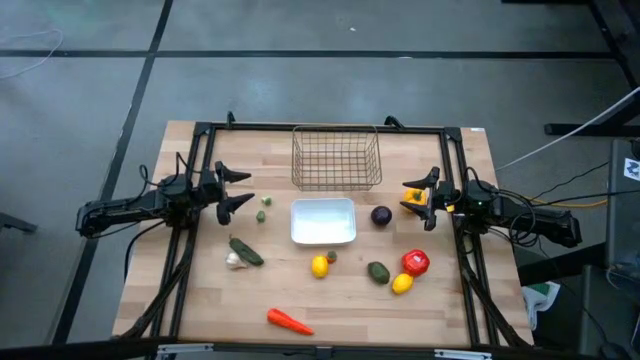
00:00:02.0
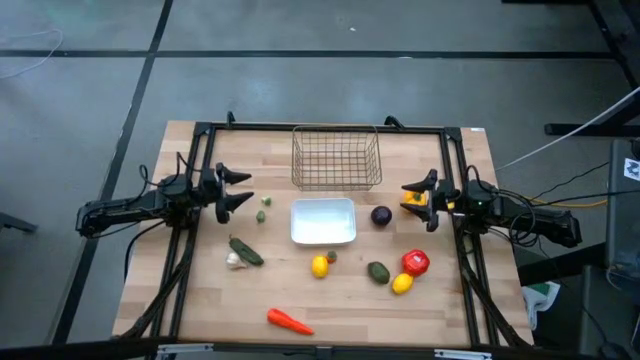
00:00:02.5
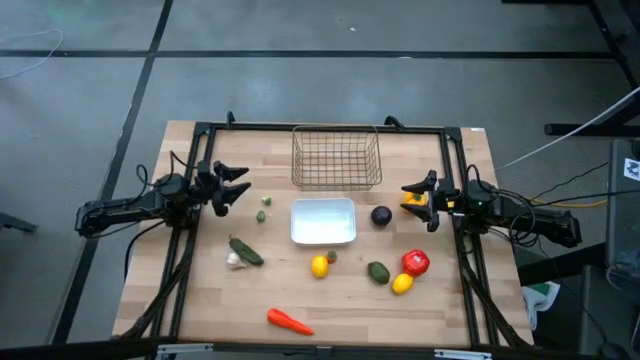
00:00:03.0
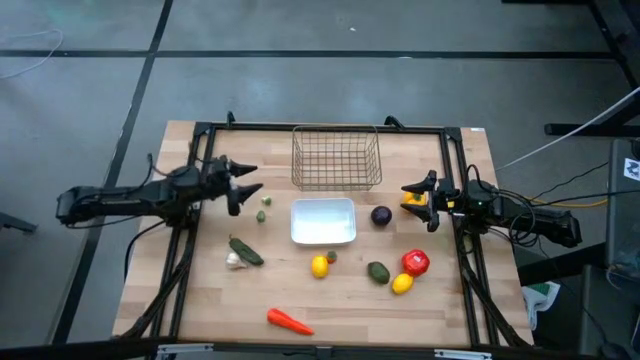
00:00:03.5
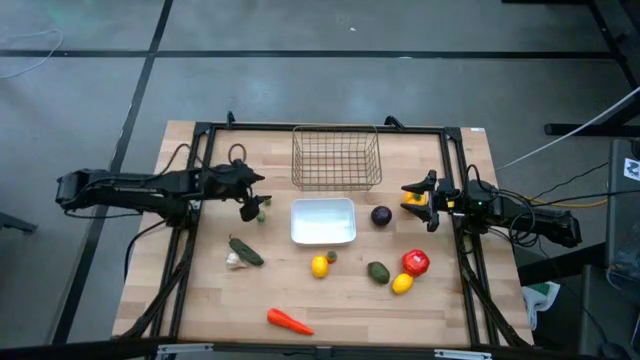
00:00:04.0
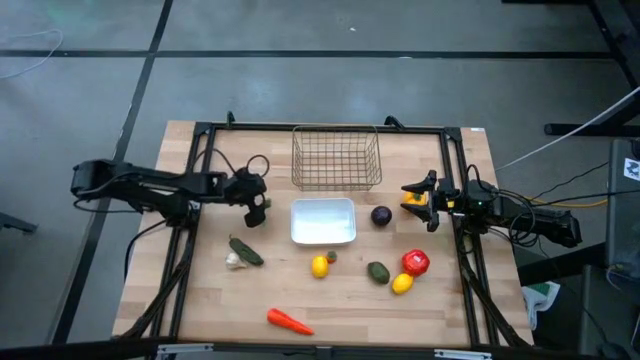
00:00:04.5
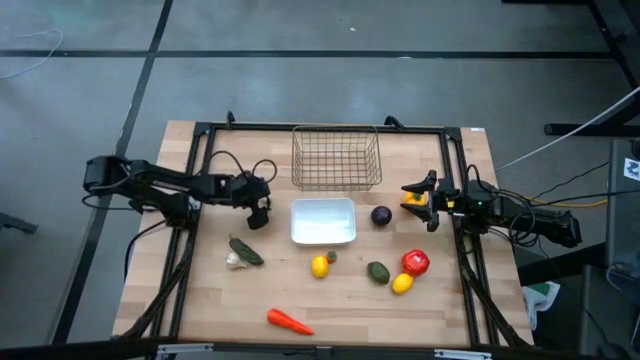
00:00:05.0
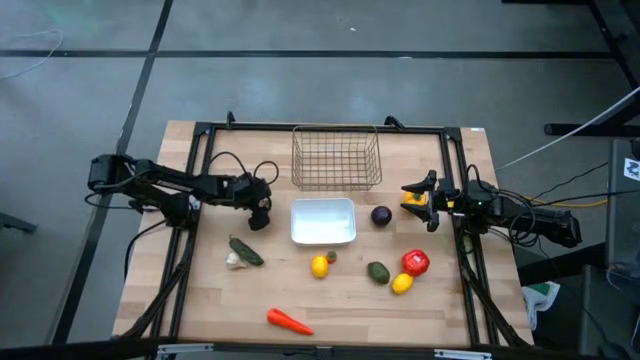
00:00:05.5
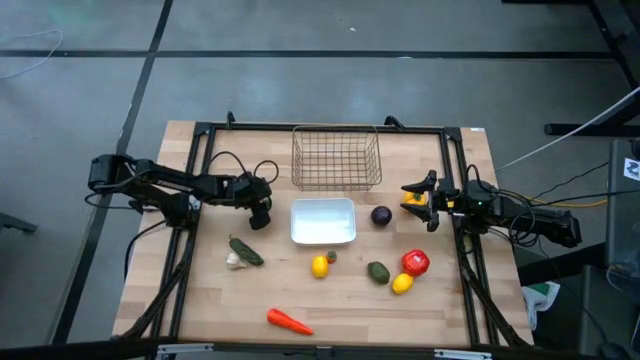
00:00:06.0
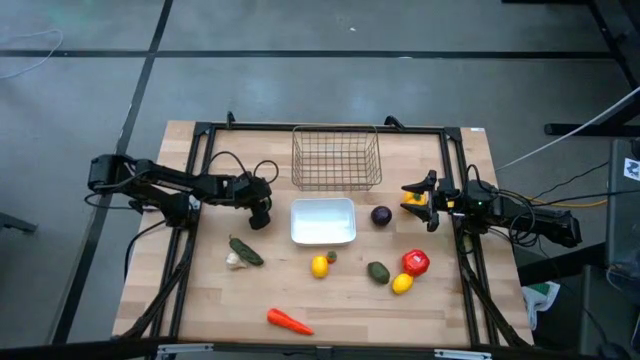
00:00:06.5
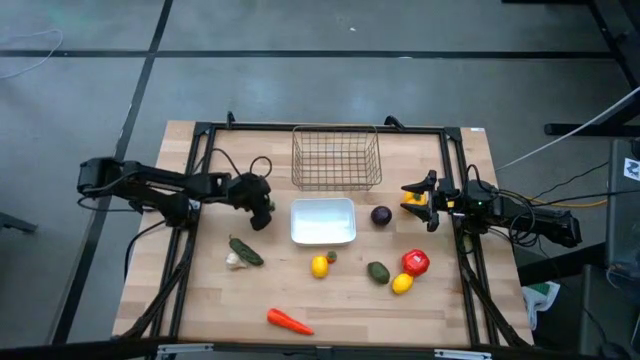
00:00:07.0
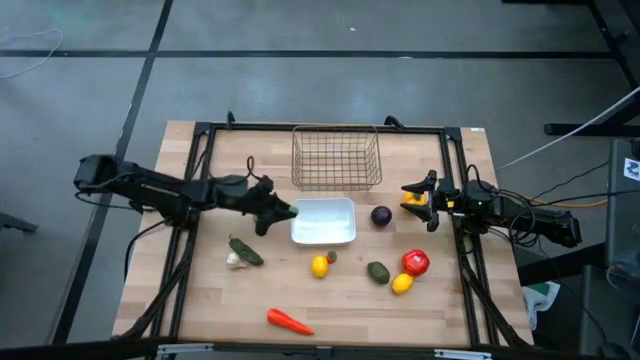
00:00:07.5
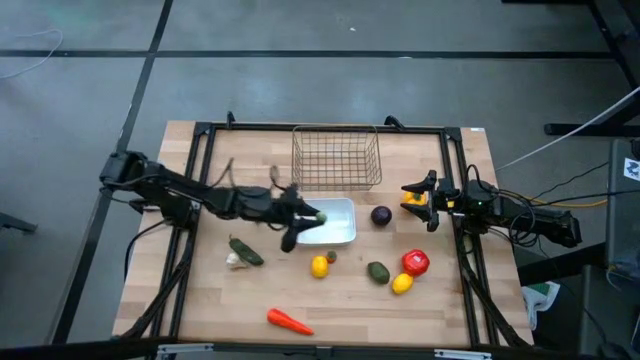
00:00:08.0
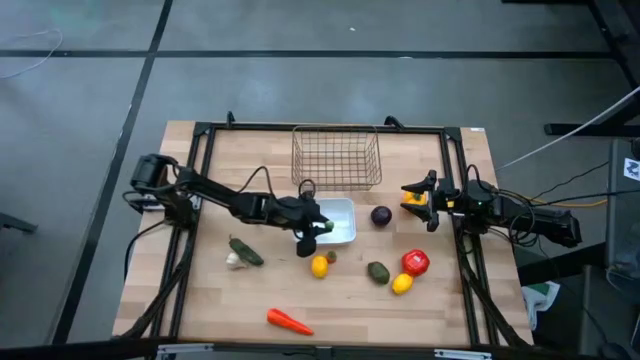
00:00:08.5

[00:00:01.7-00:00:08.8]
Task: Sort produce into baskets
Put the green mushroom into the white bin

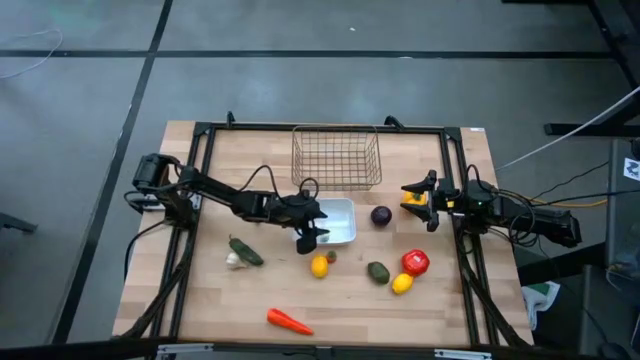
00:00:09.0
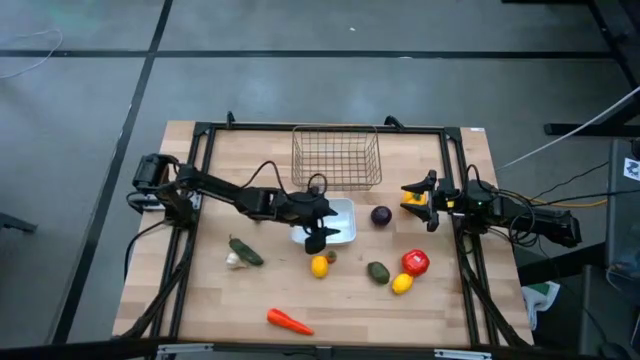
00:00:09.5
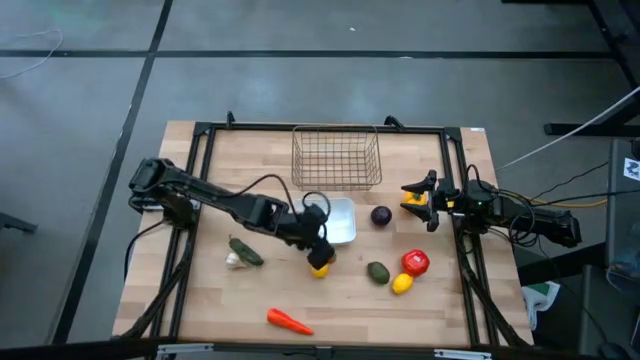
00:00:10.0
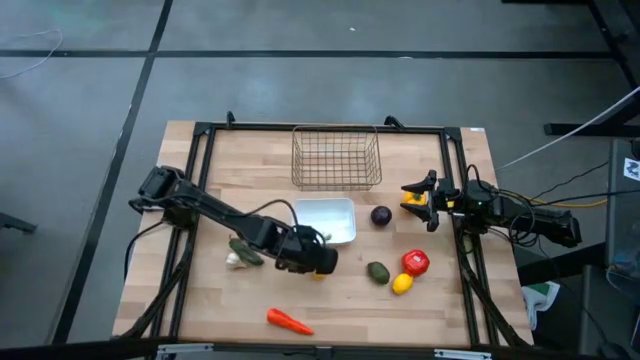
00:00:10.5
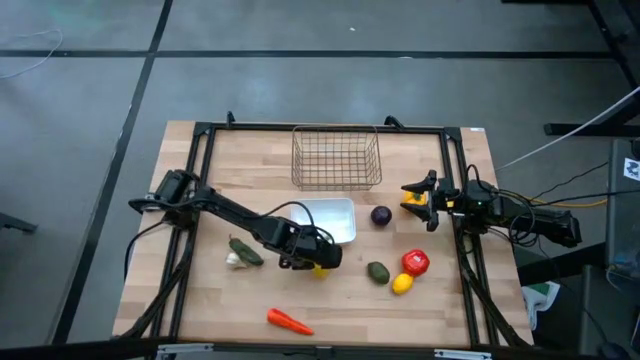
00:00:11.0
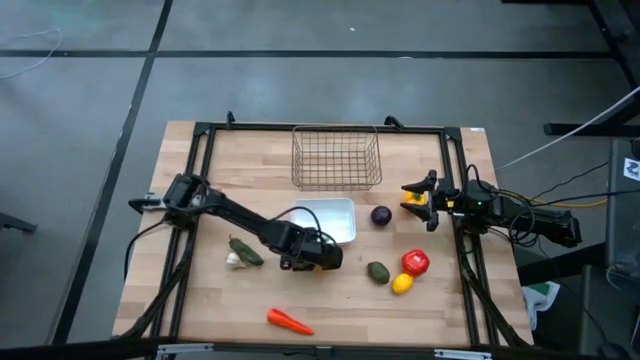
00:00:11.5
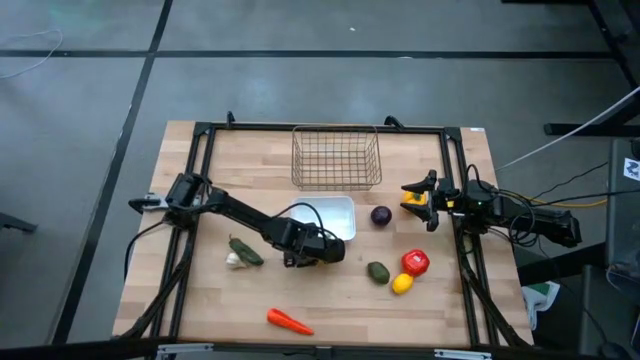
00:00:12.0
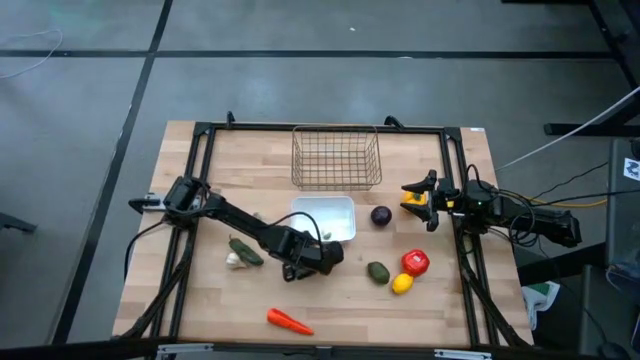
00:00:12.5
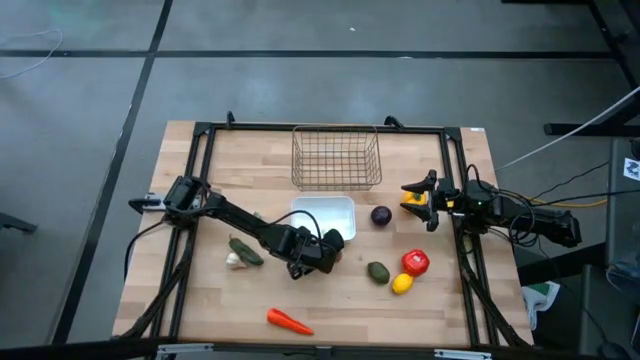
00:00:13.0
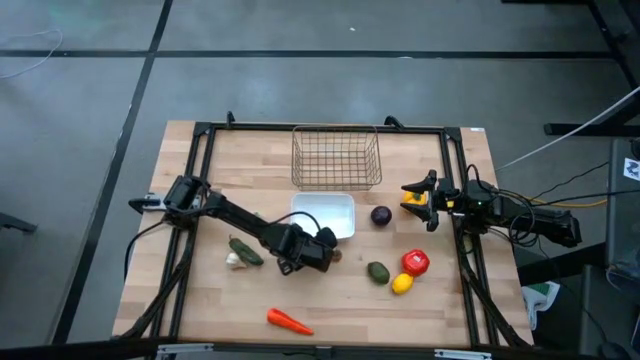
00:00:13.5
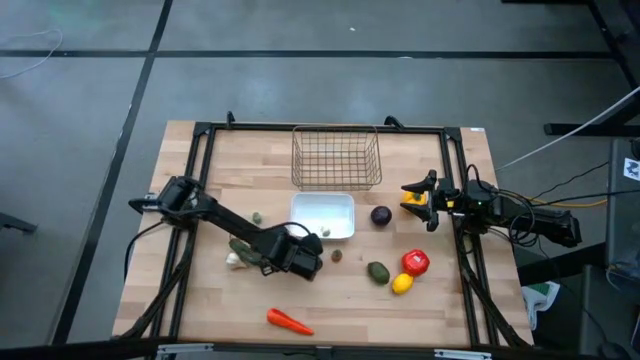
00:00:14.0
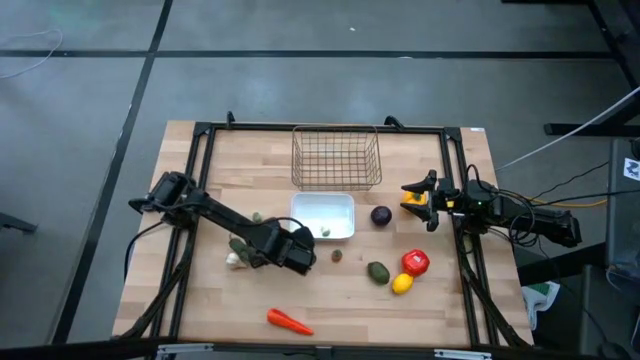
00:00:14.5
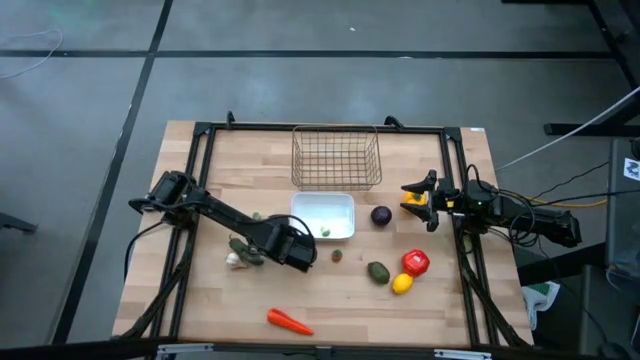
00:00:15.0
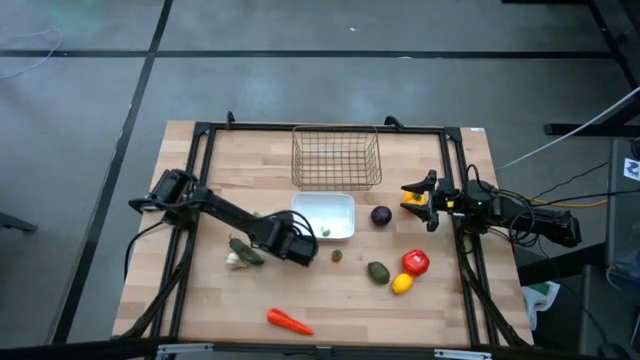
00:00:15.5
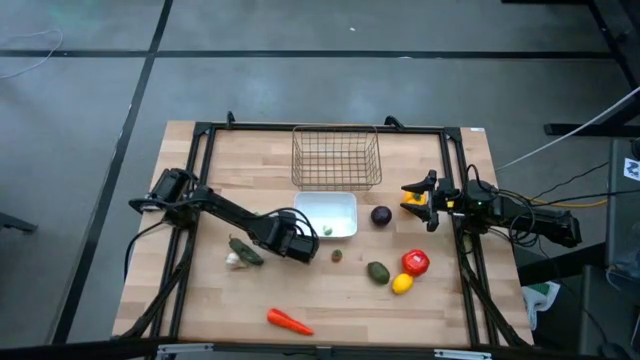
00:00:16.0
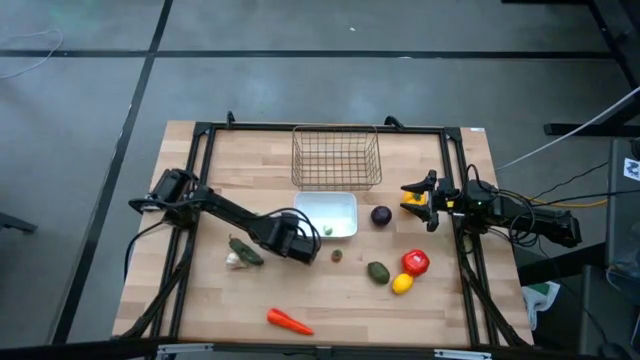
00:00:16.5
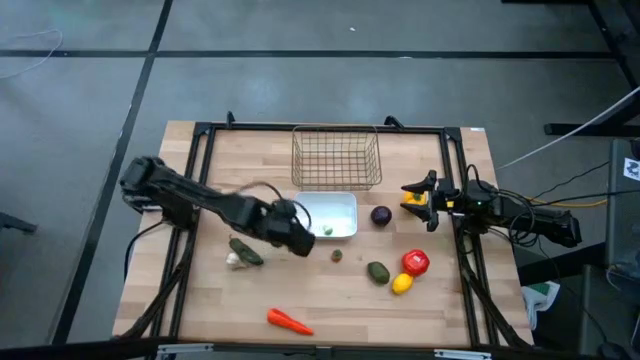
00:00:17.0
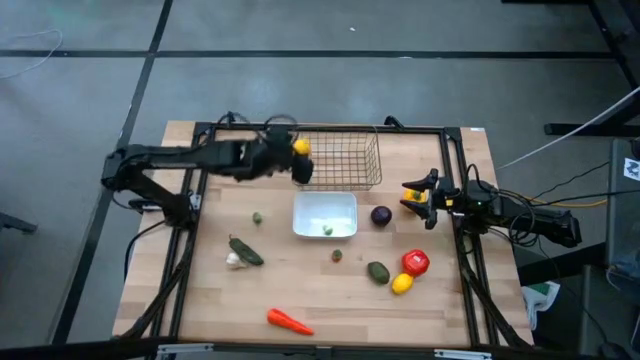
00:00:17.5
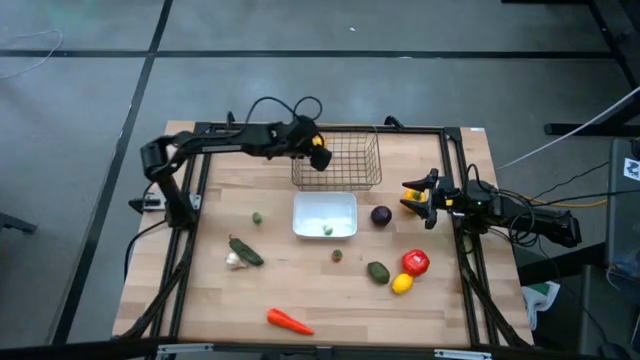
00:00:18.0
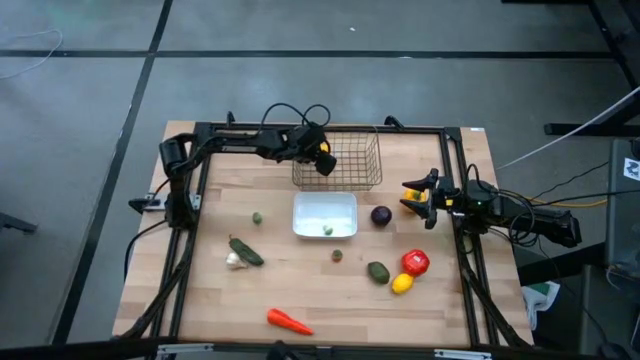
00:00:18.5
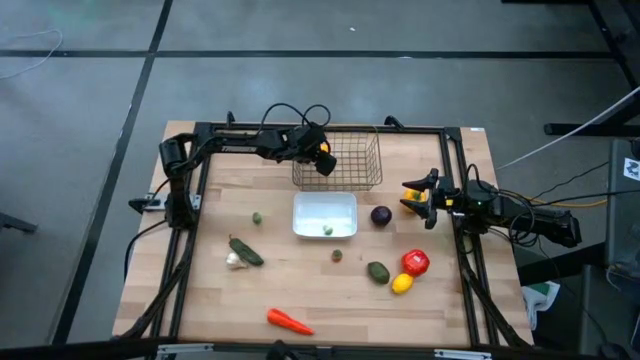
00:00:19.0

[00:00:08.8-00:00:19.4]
Put the left yellow lemon into the black wire basket

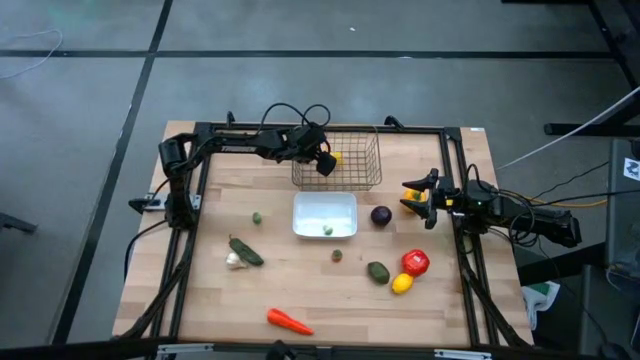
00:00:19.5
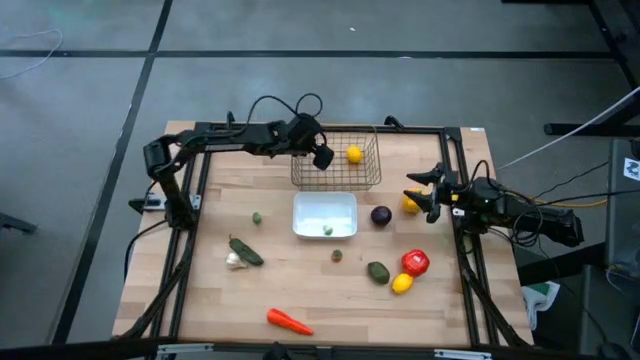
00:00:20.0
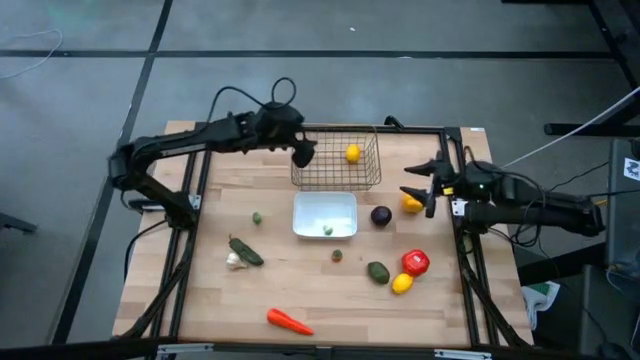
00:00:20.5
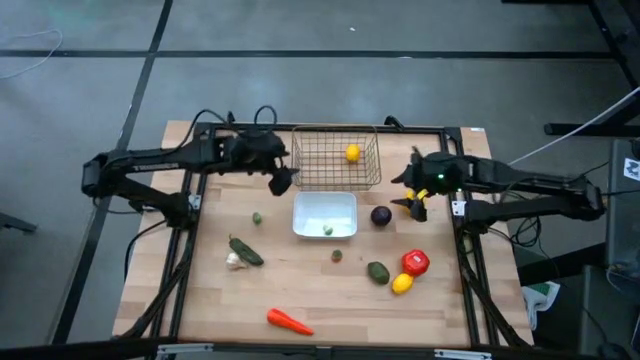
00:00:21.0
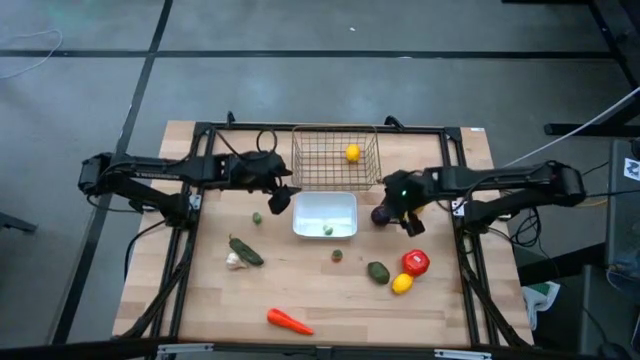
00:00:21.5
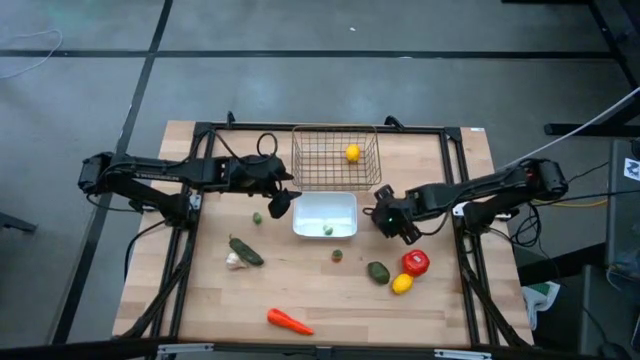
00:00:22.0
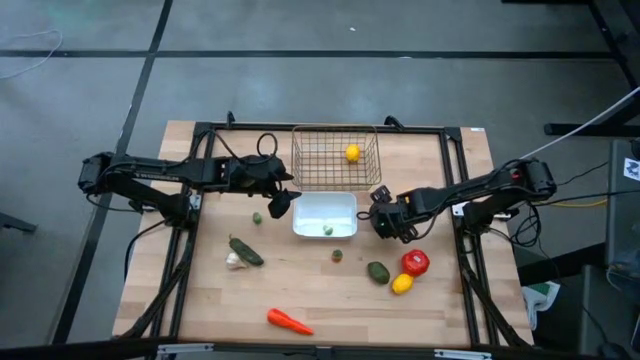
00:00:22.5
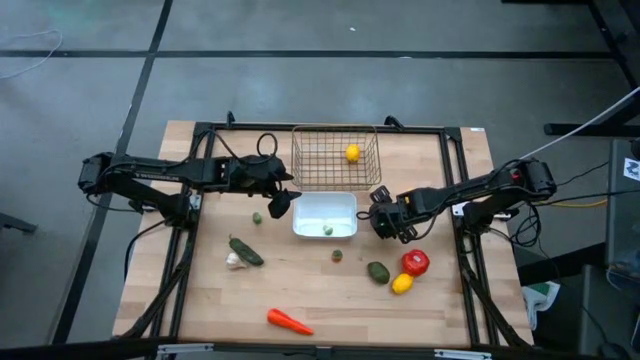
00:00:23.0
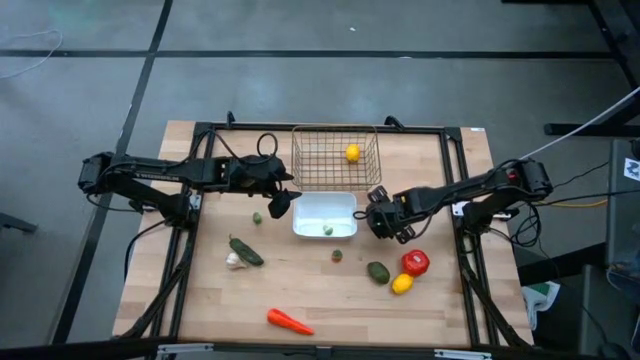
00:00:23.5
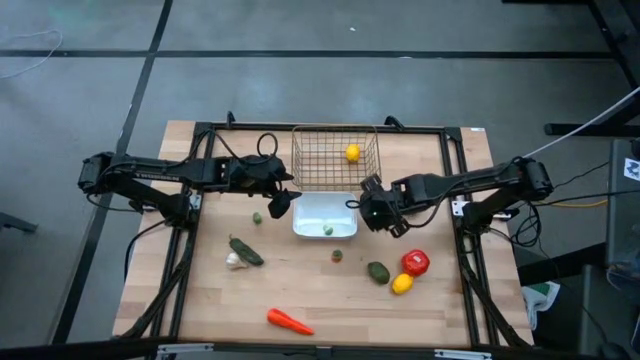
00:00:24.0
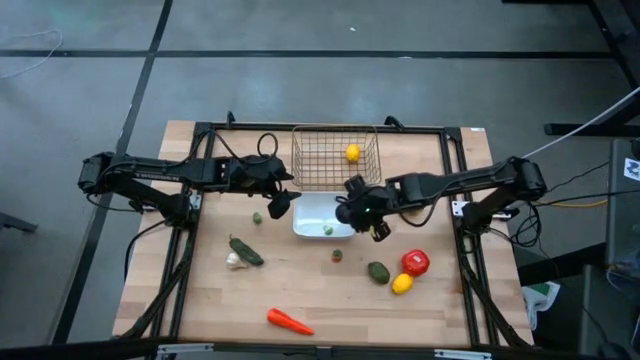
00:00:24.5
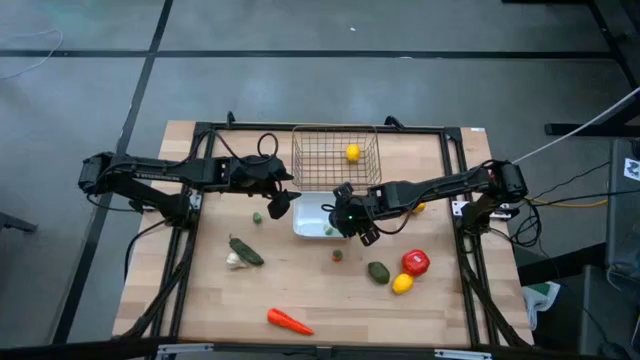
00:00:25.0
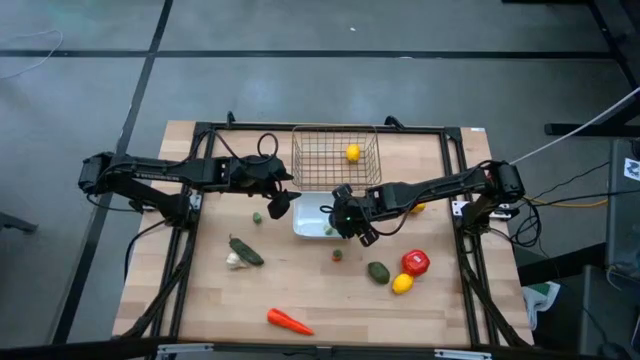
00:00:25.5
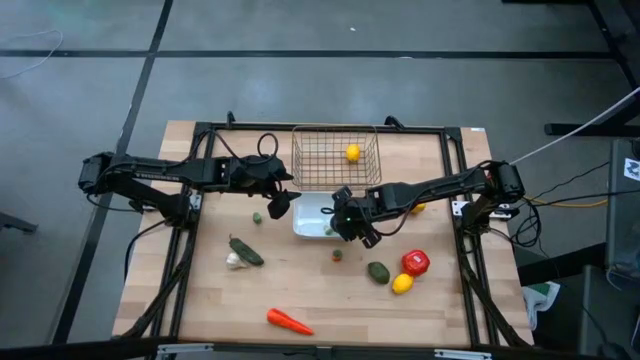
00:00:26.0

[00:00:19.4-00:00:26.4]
Put the violet plum into white bin
